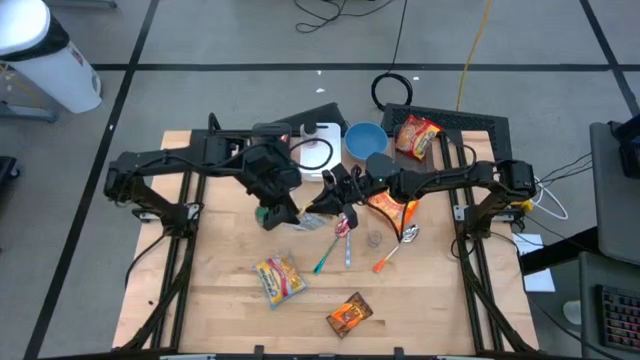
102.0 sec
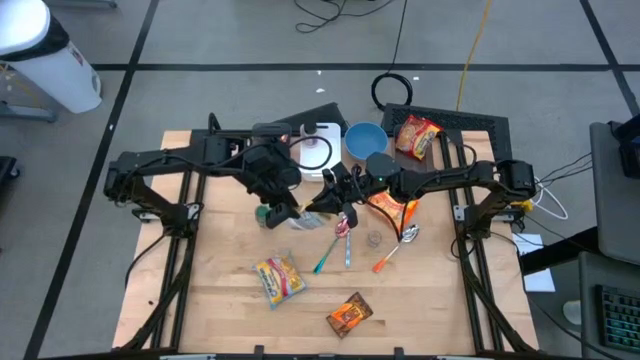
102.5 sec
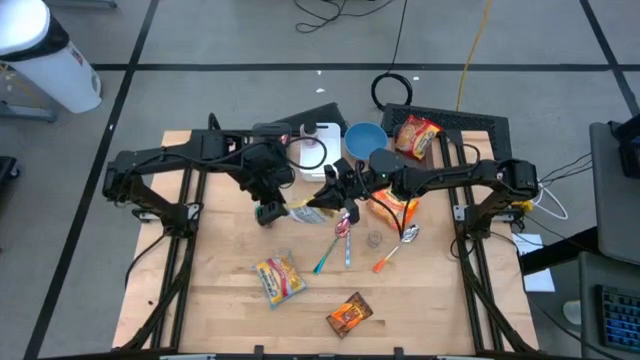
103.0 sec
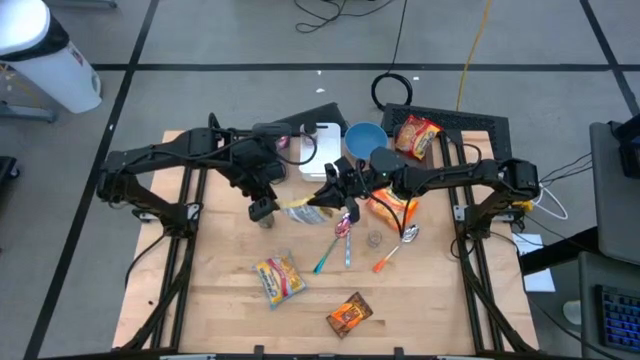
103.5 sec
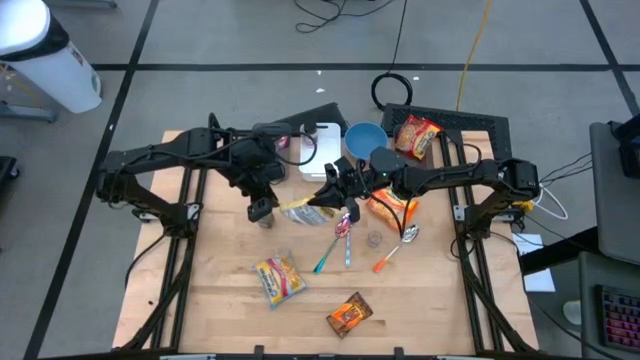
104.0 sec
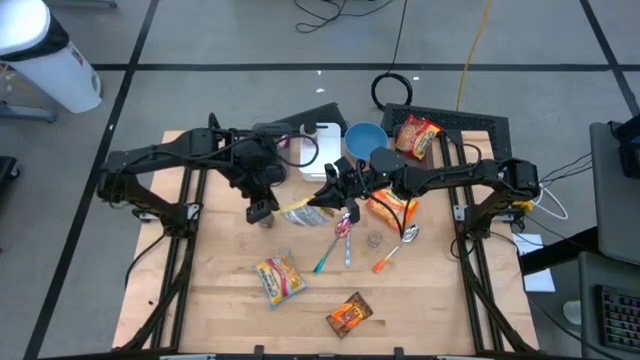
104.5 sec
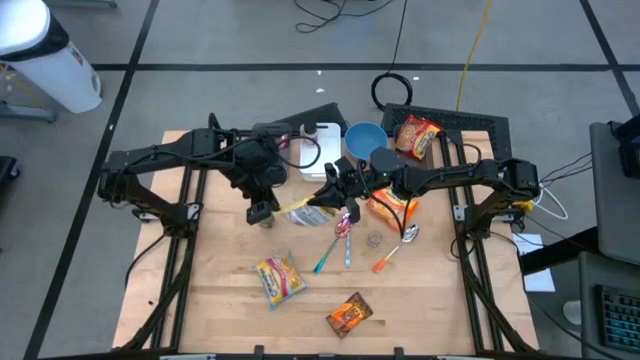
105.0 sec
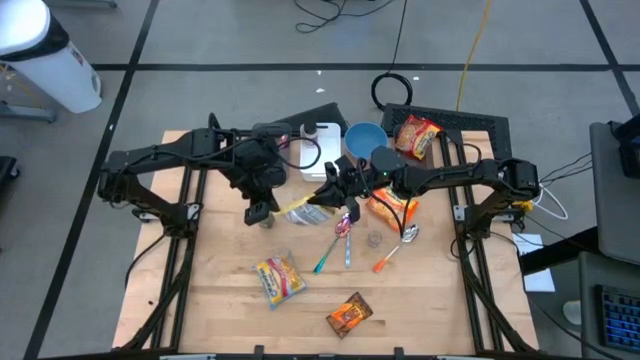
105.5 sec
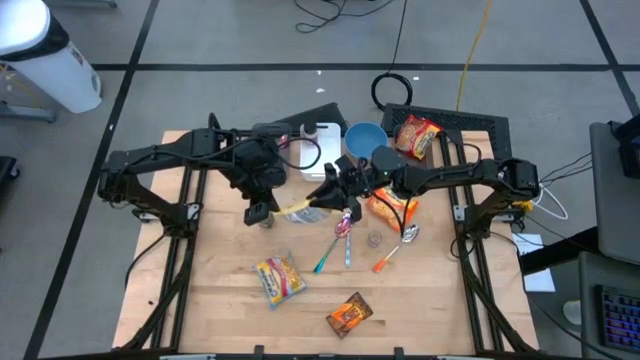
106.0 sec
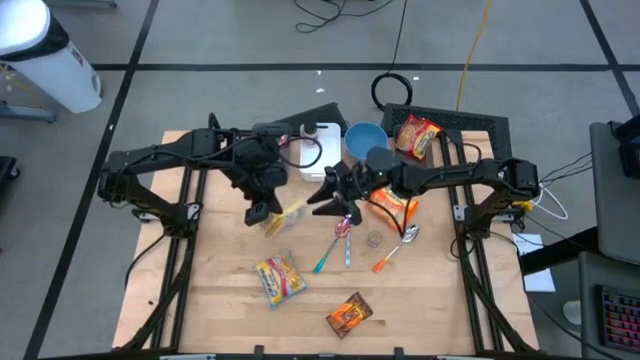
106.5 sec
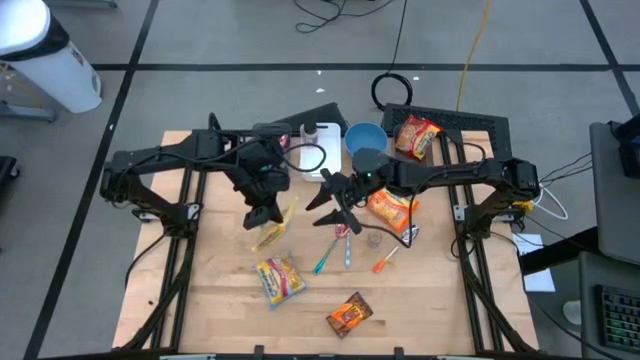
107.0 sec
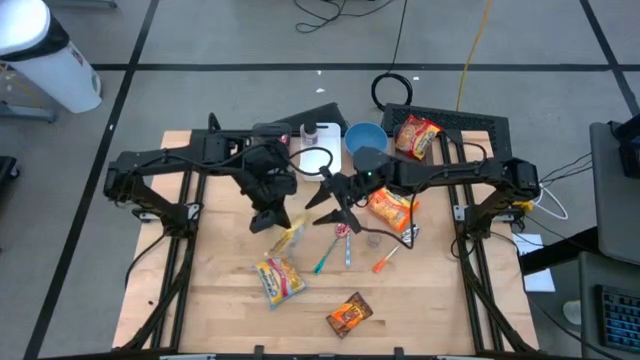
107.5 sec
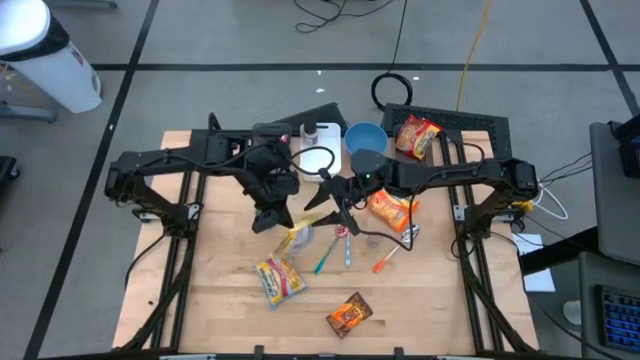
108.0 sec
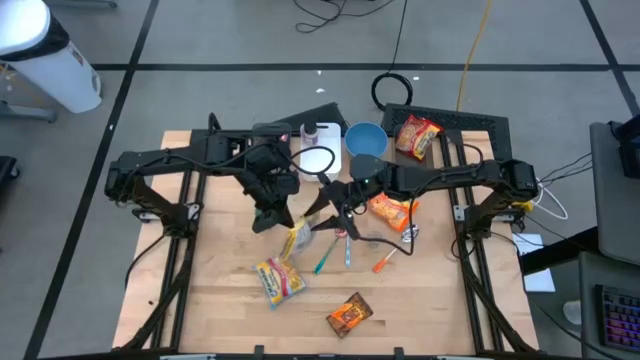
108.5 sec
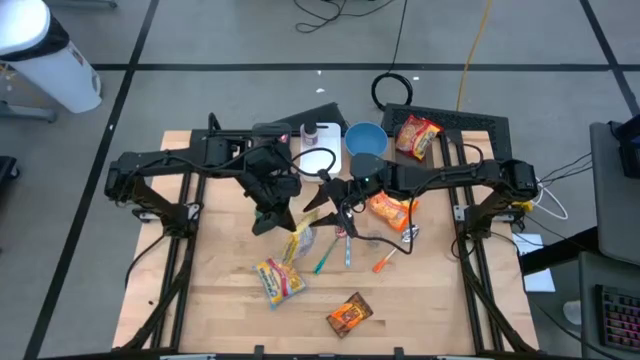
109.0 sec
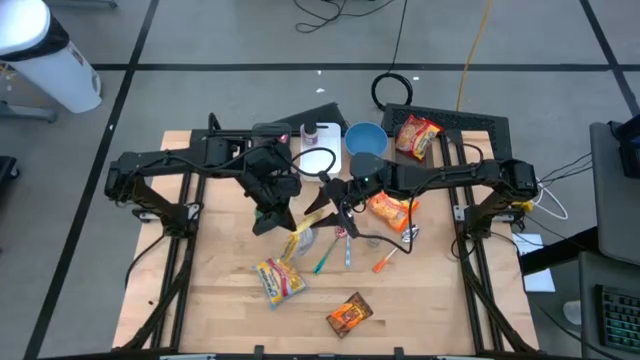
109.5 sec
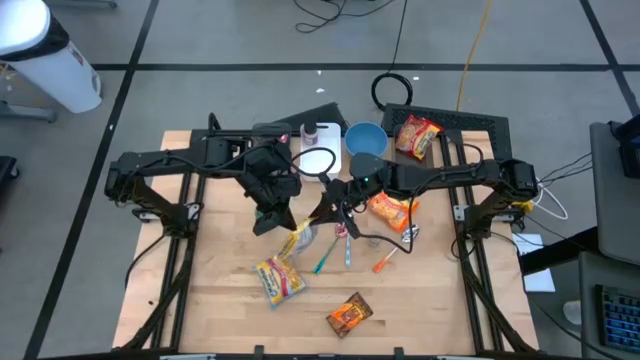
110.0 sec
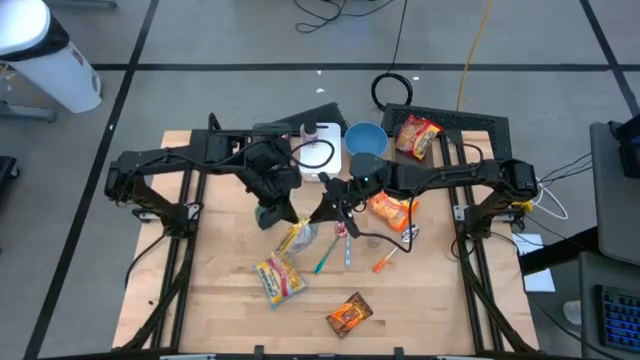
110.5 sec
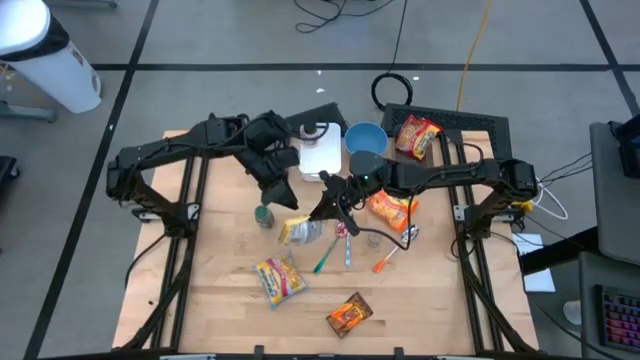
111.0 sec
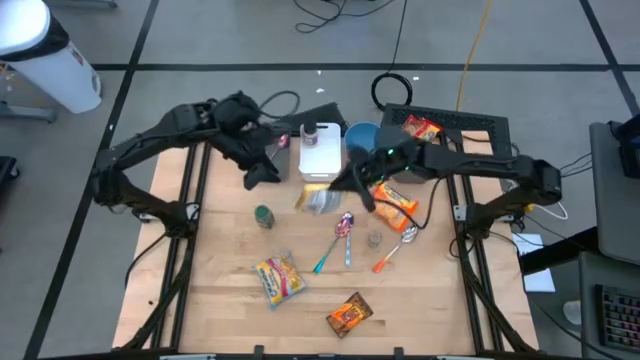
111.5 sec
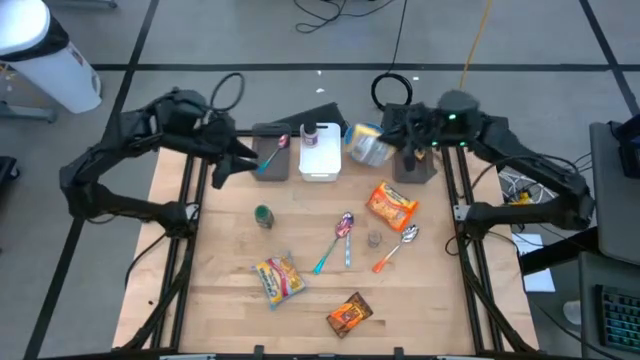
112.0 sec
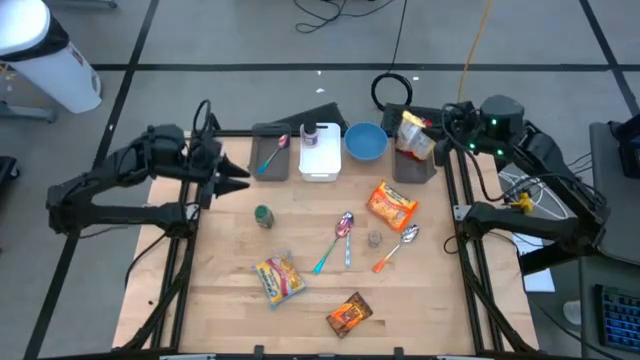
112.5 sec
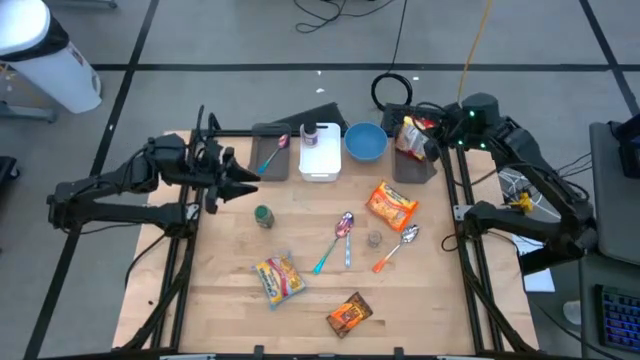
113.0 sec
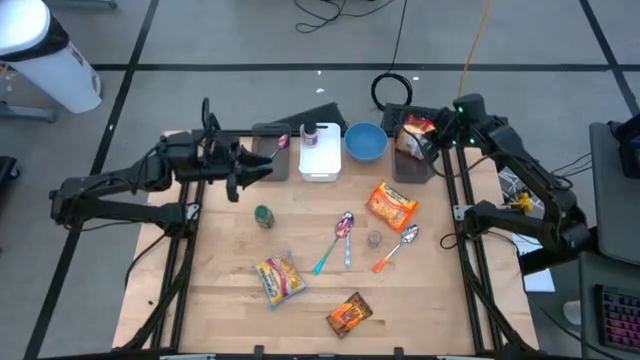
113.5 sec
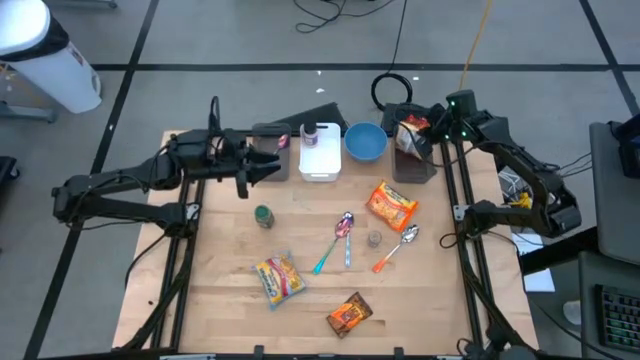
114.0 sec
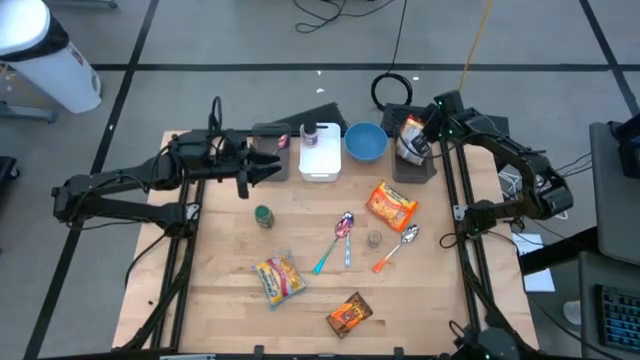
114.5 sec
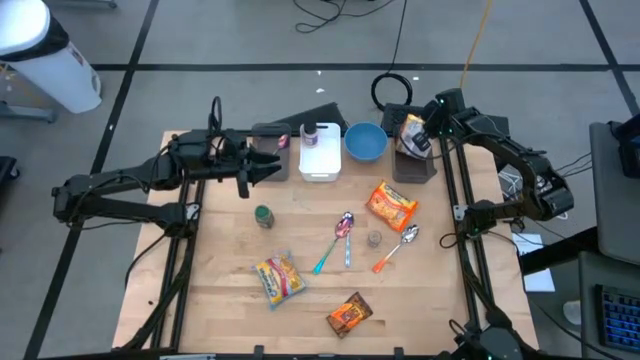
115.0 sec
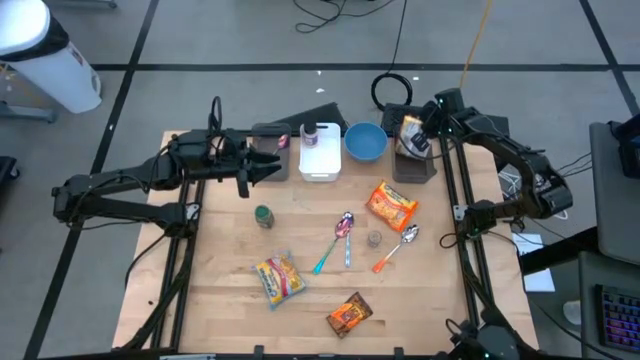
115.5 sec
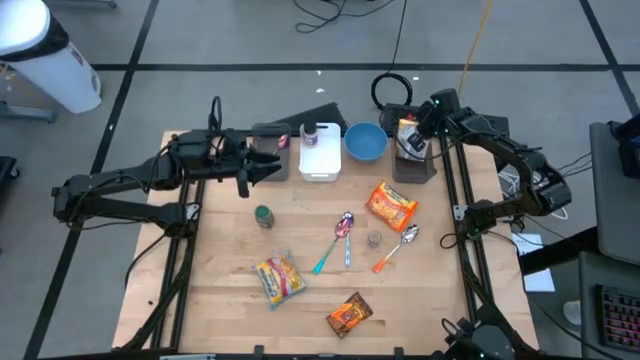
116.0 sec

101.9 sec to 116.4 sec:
Task: Pick & Place Food Item
Put the yellow noodle pack into the right black bin

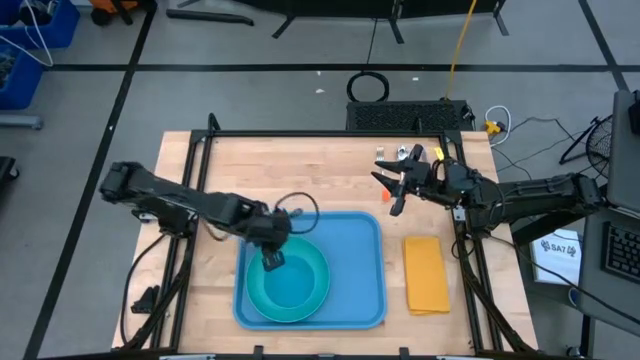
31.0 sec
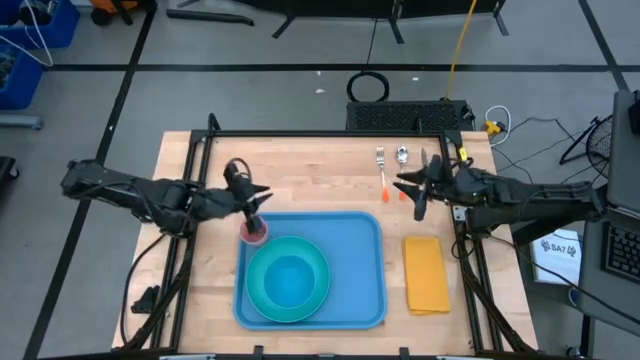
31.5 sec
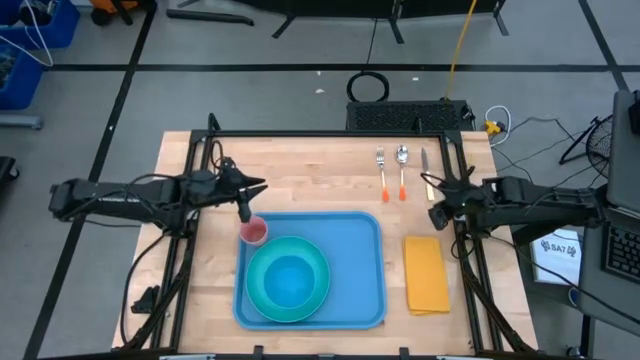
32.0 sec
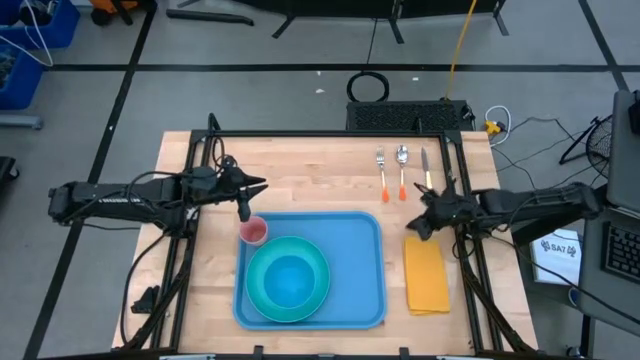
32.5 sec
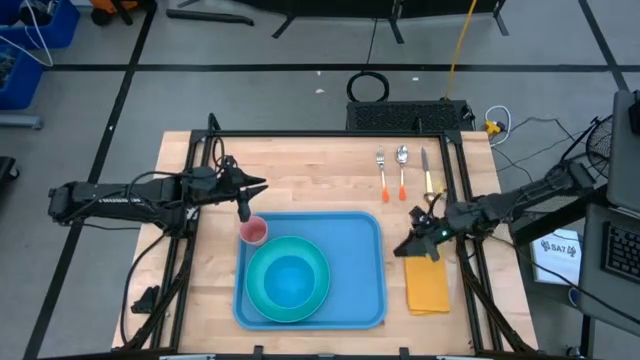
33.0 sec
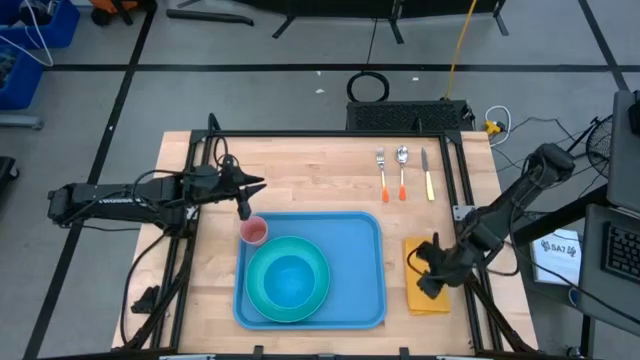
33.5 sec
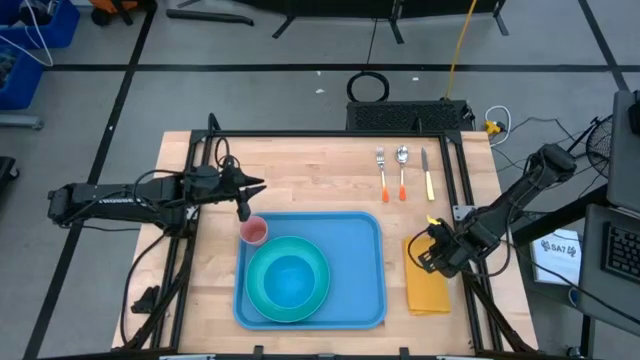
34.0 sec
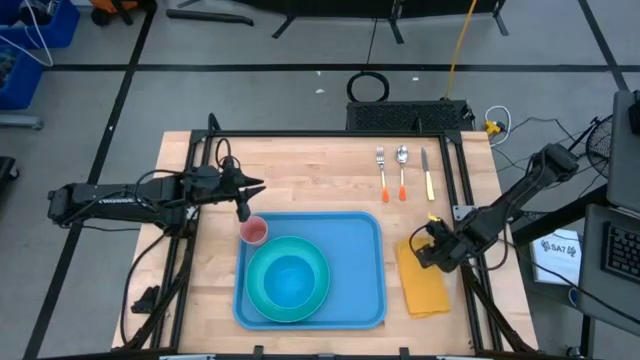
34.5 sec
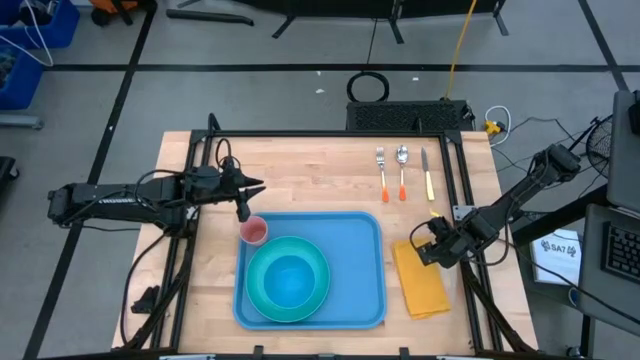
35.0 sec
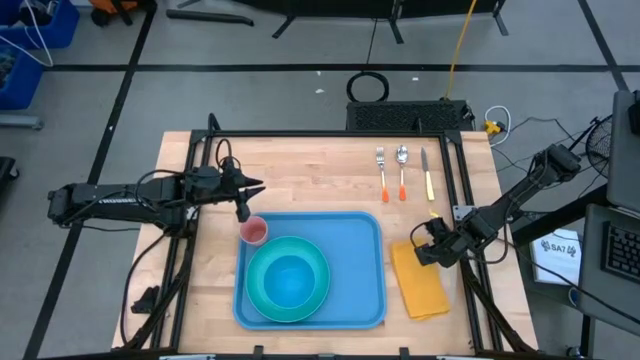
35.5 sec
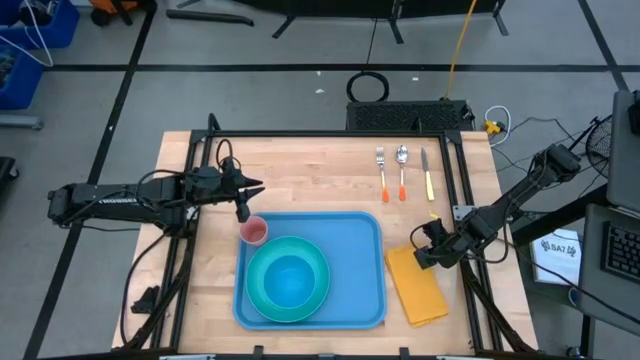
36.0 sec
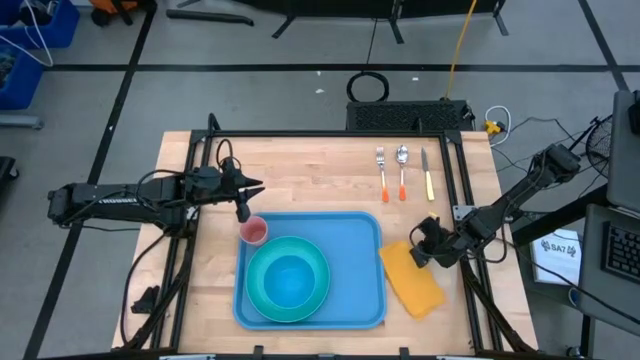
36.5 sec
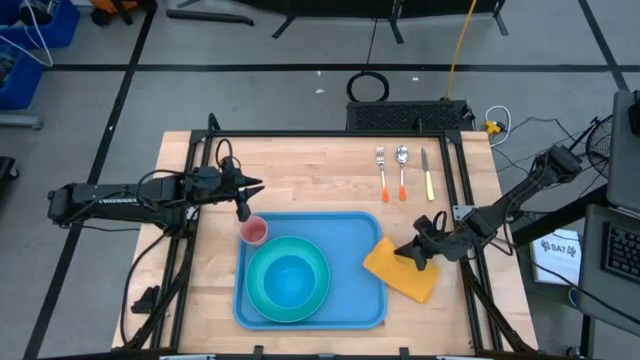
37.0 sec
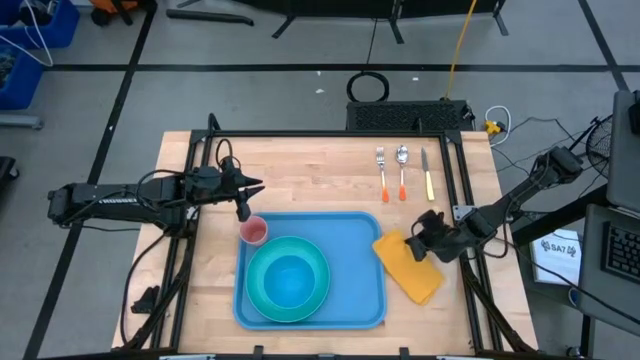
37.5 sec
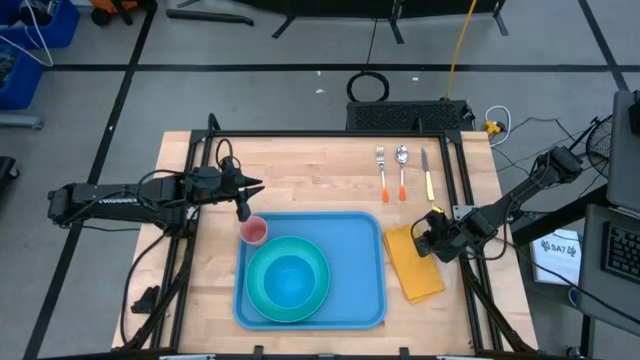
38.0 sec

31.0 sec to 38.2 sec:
Task: Set up tray
Put the yellow napkin to the right of the blue plate on the blue serving tray
